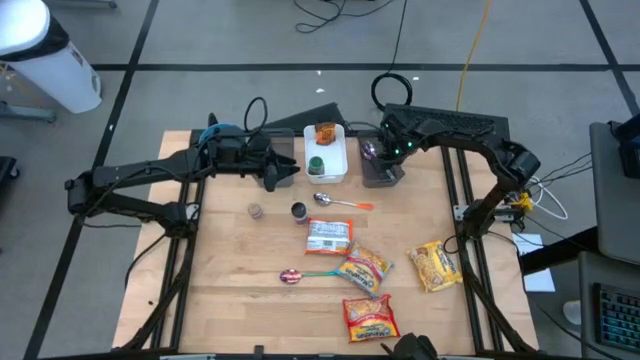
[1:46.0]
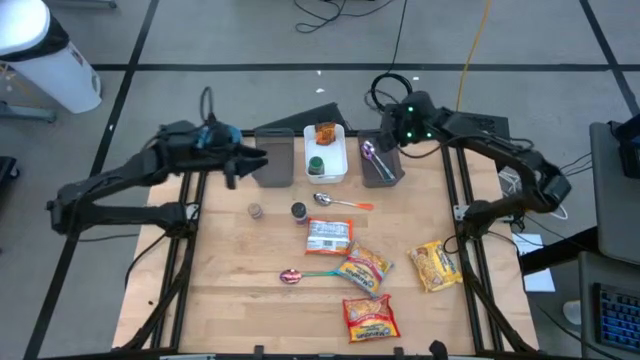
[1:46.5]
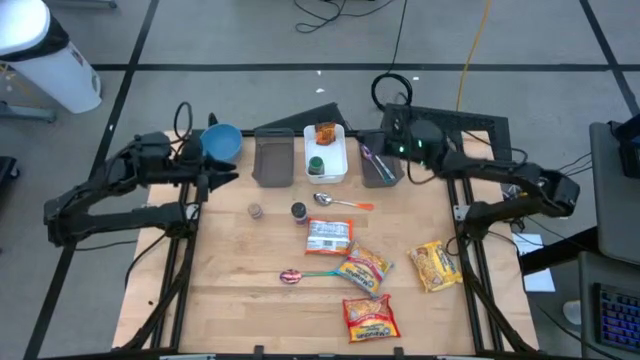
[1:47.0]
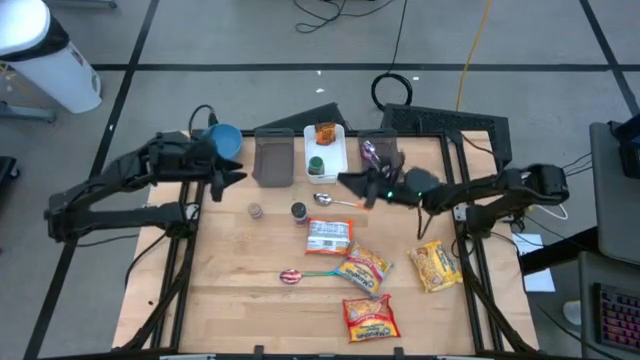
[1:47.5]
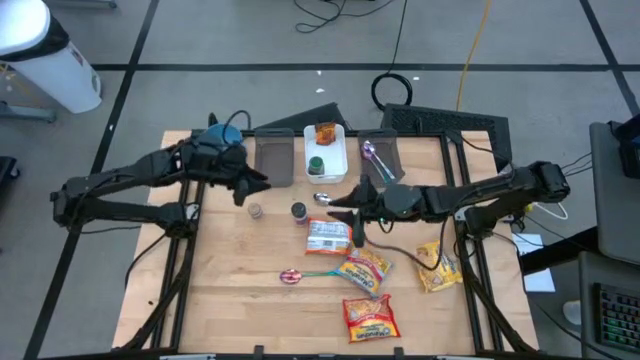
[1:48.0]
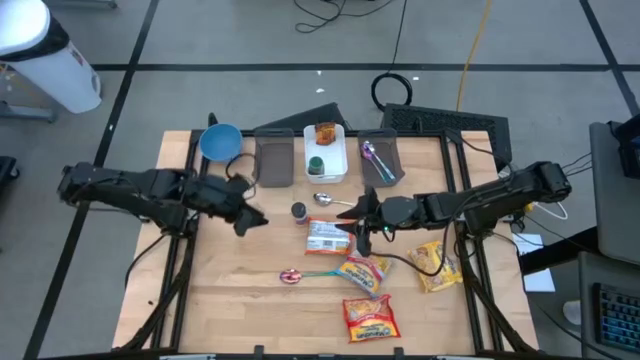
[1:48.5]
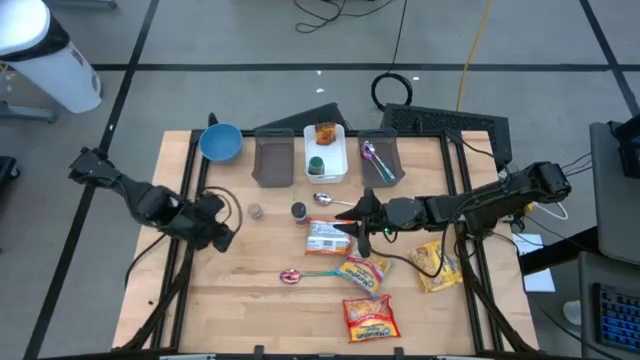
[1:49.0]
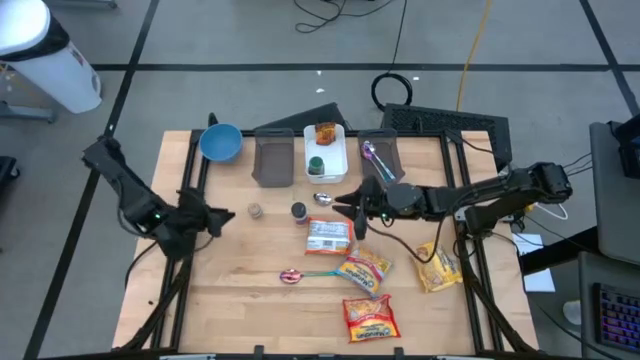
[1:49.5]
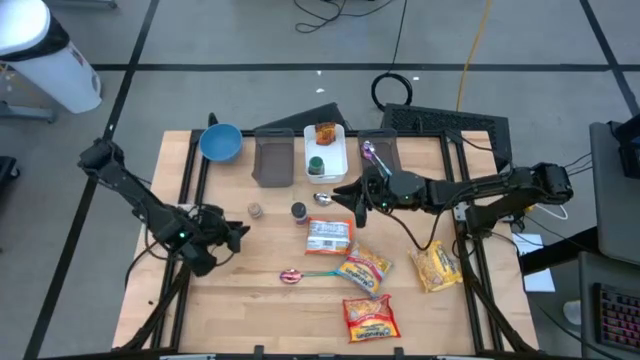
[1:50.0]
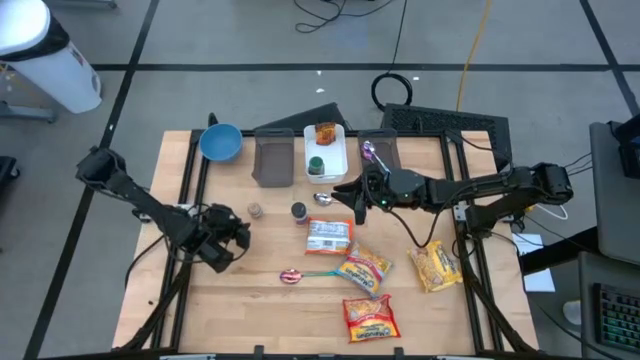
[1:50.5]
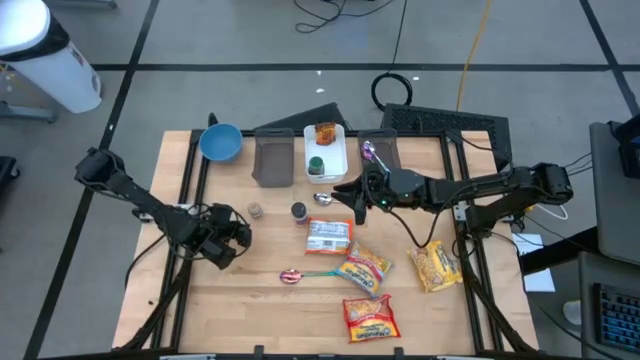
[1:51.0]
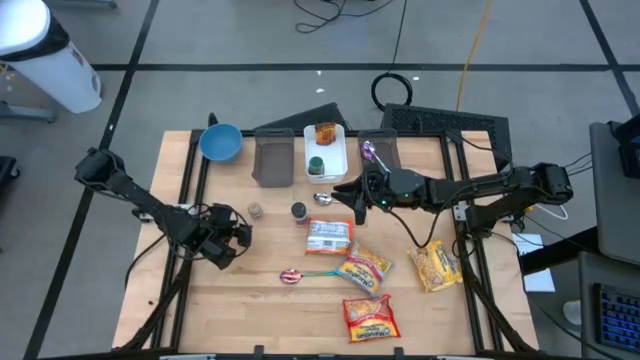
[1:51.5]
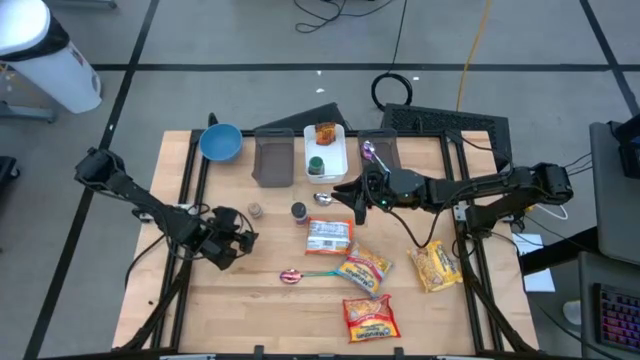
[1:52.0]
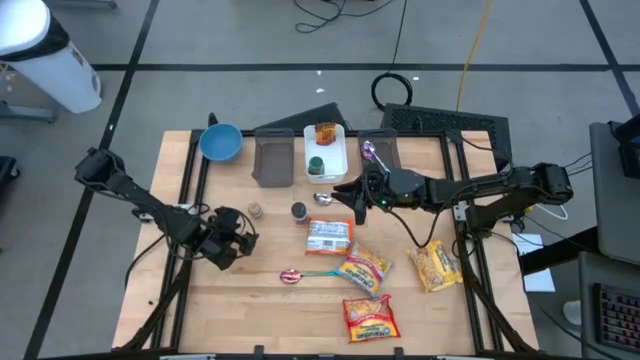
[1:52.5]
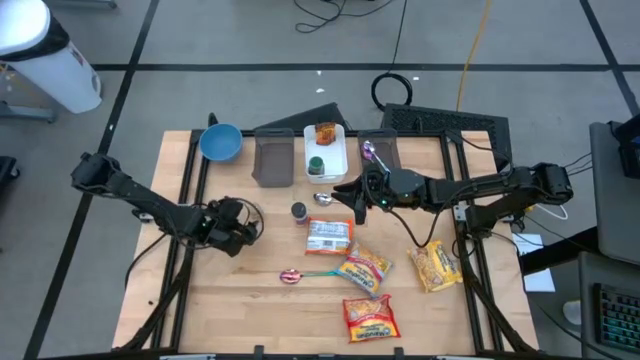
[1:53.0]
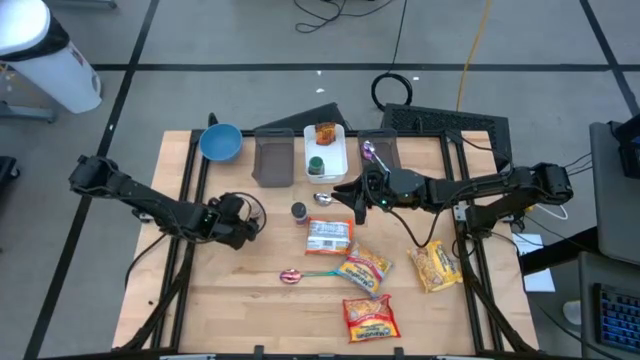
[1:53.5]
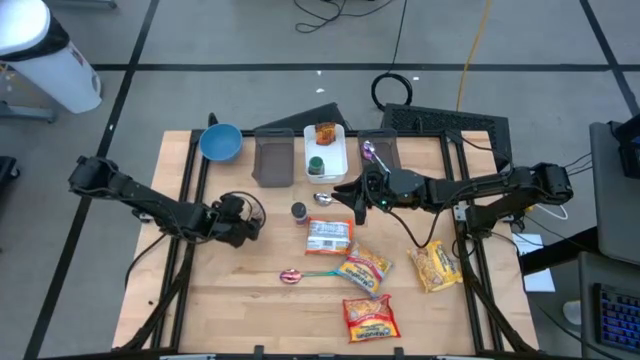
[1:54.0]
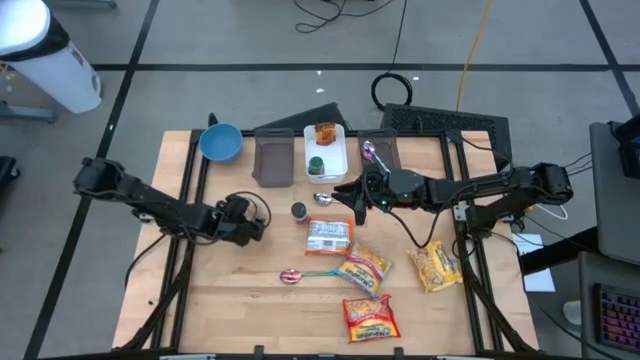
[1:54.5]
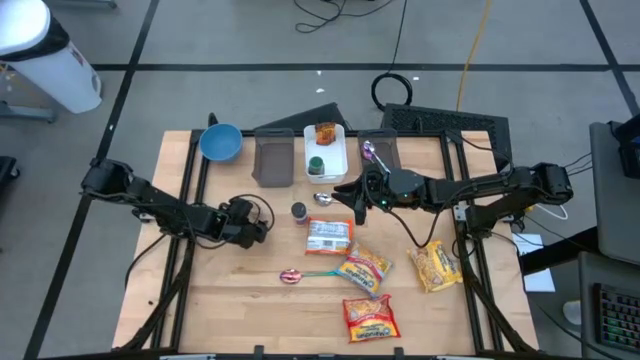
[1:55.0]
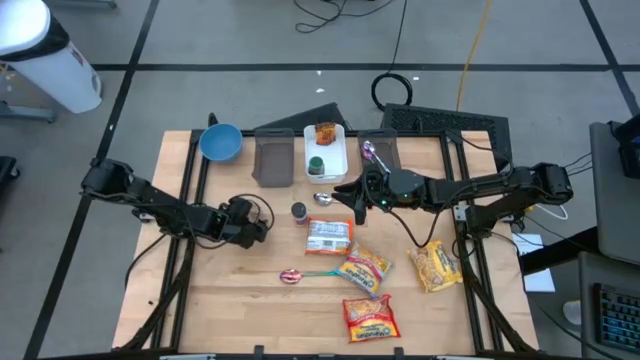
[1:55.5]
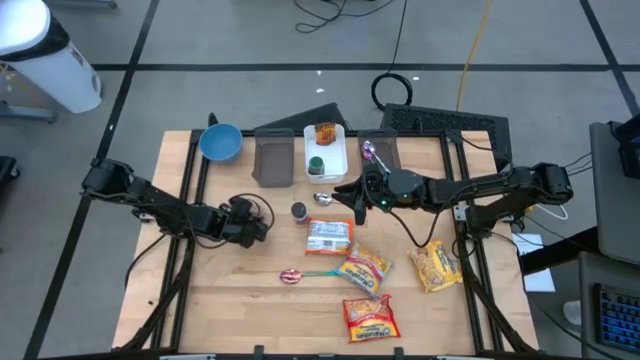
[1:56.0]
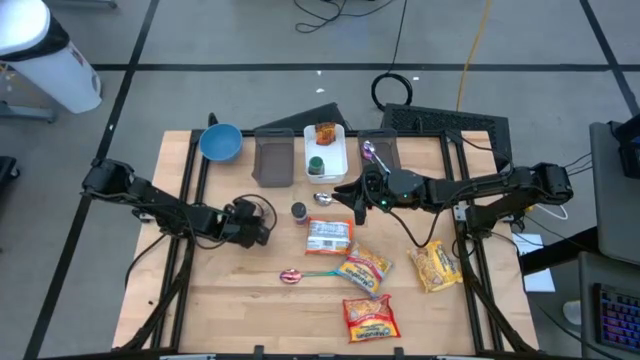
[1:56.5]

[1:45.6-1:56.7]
Task: Pick & Place Food Item
Put the brown seasoning bottle into the white bin

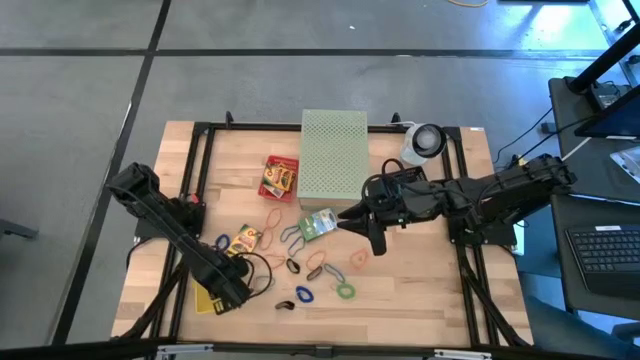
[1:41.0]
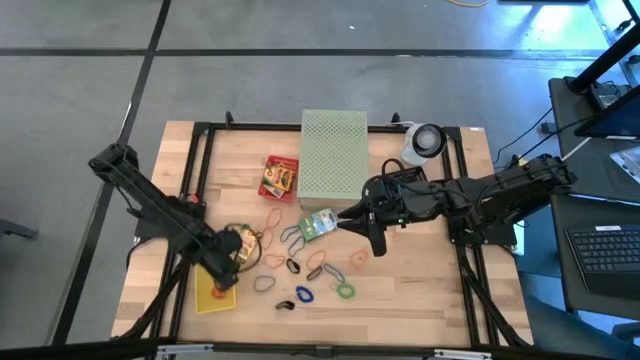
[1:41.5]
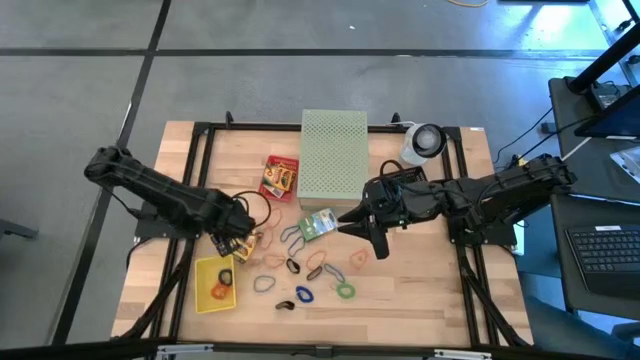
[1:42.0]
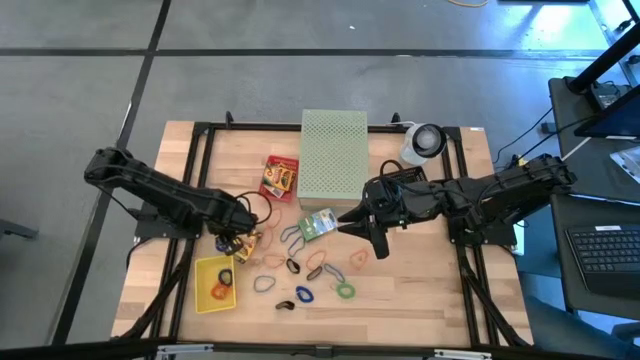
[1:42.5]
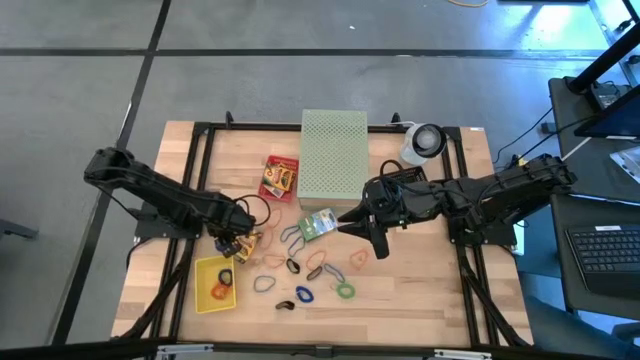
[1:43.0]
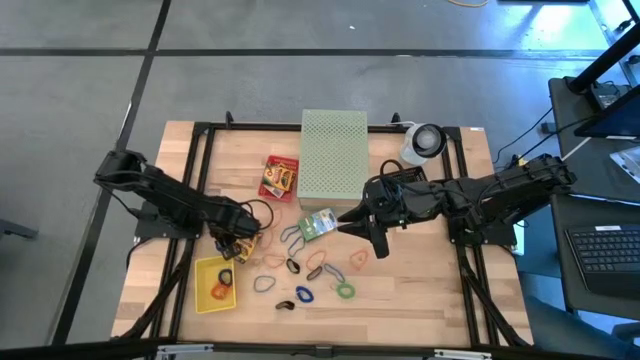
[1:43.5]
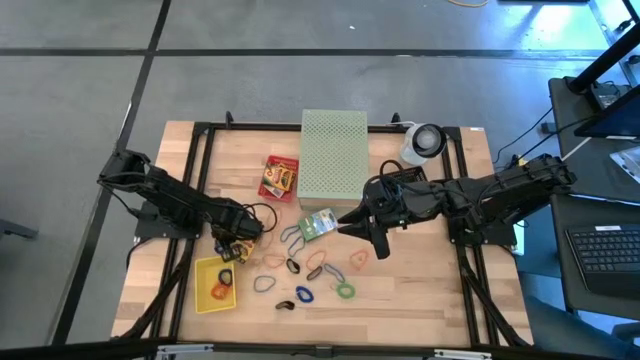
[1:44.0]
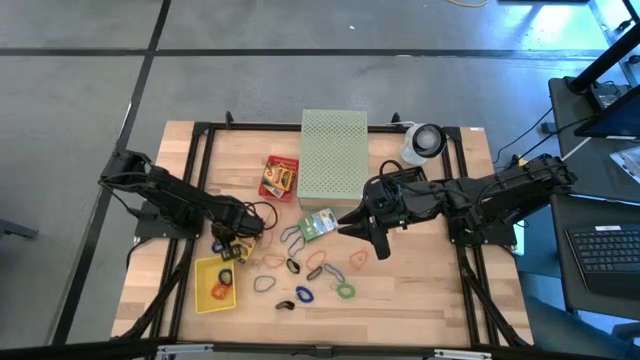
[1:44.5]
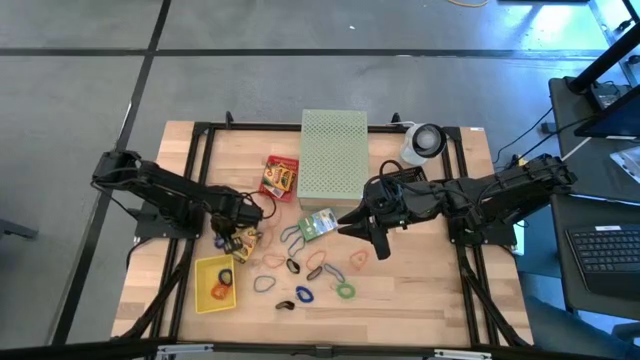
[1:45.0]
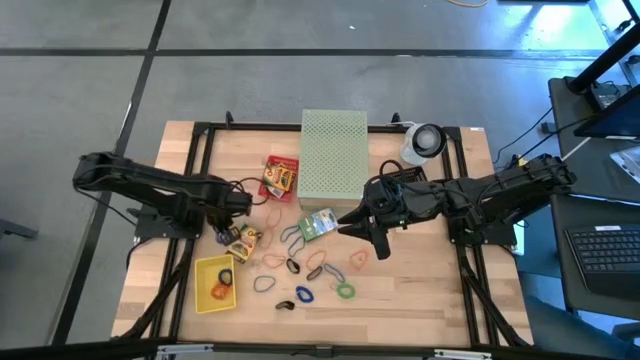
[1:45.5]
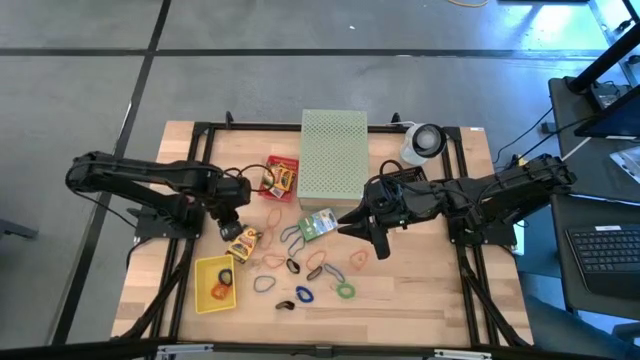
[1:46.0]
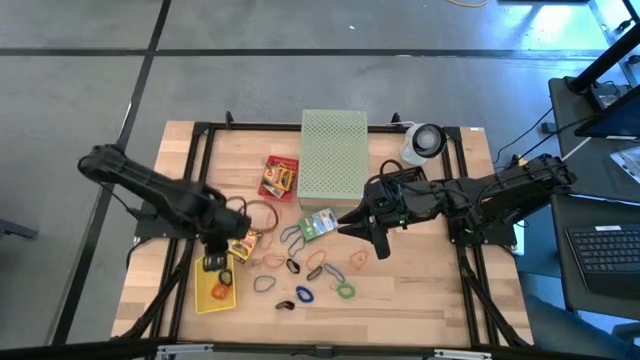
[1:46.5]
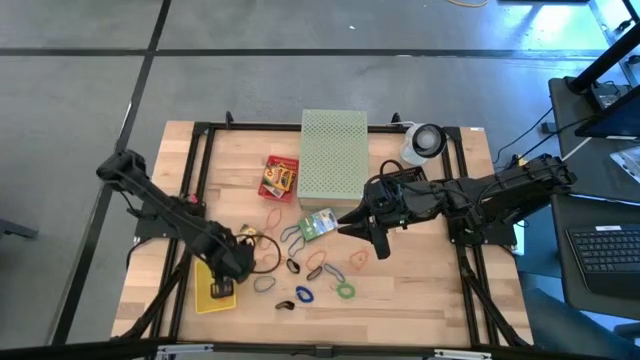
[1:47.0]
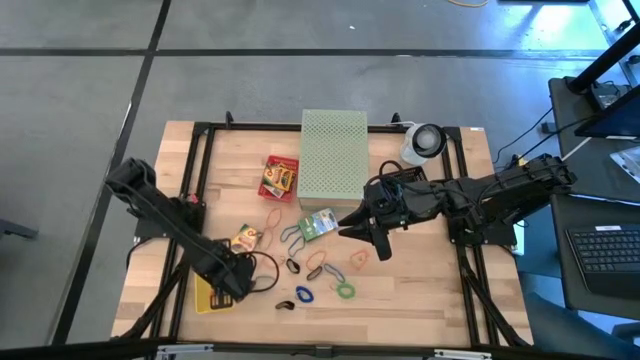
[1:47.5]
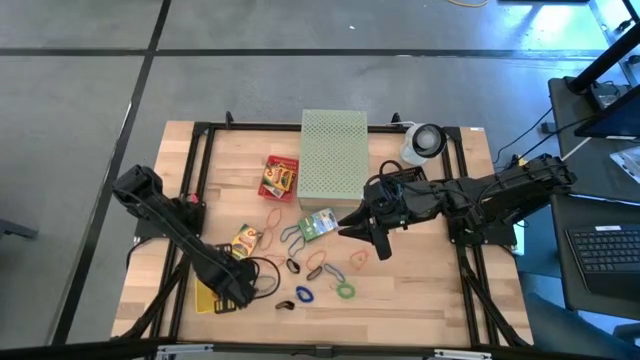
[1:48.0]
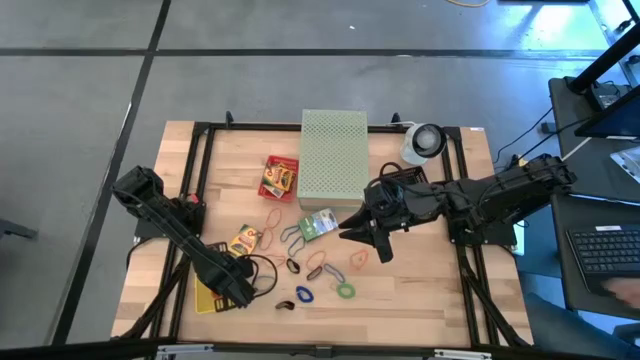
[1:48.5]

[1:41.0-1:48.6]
Task: Pick & Place Office Desk Supplies
Put the blue spring rubber band into the yellow bin

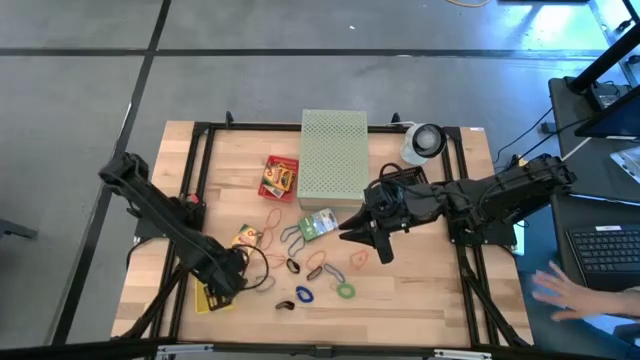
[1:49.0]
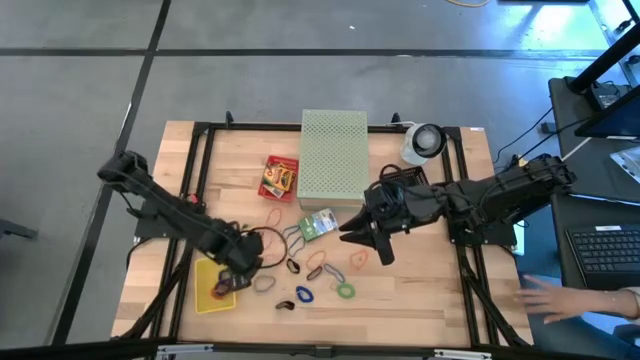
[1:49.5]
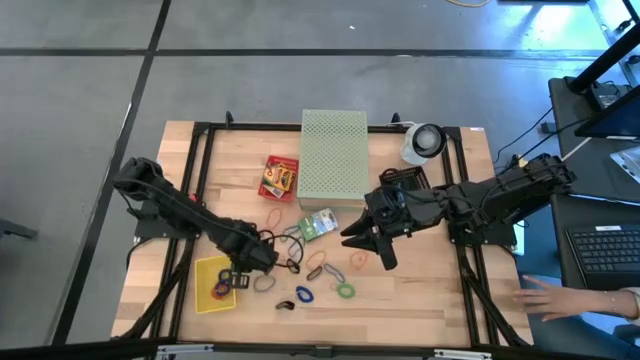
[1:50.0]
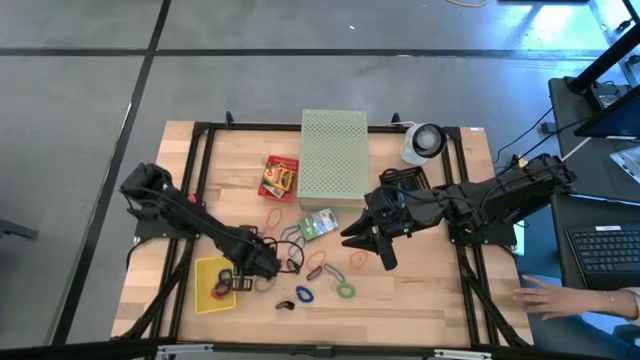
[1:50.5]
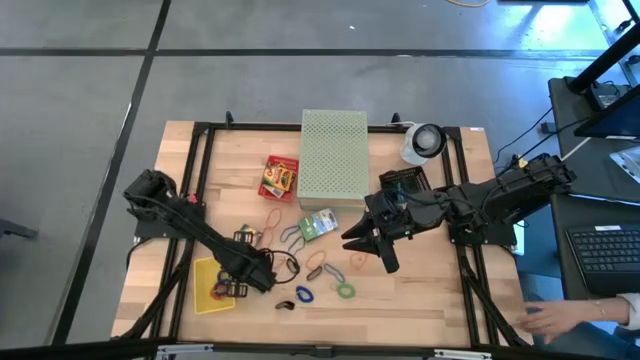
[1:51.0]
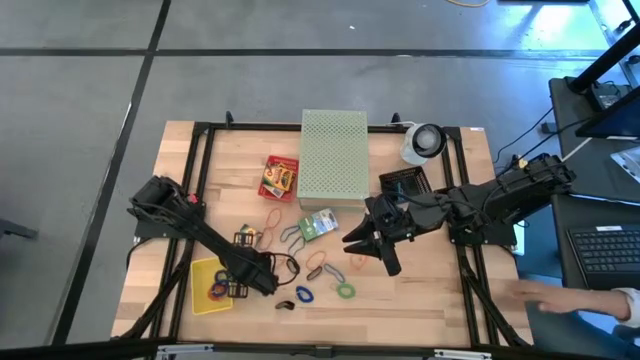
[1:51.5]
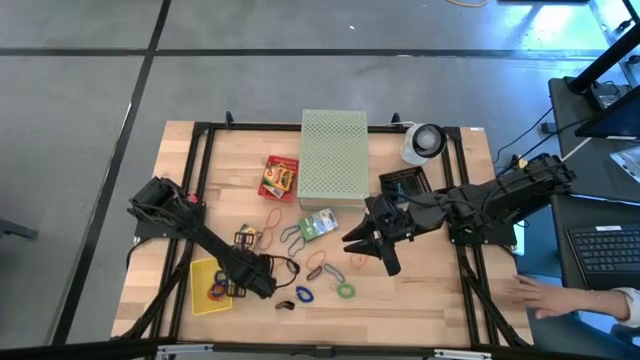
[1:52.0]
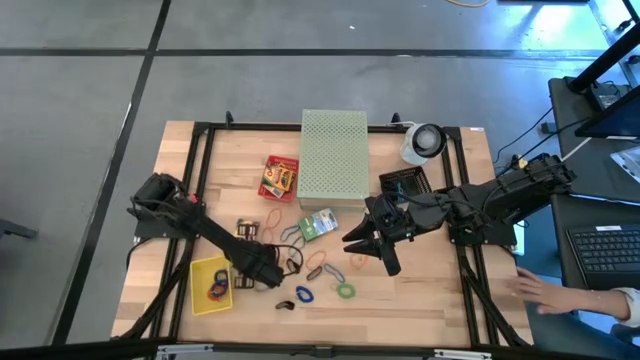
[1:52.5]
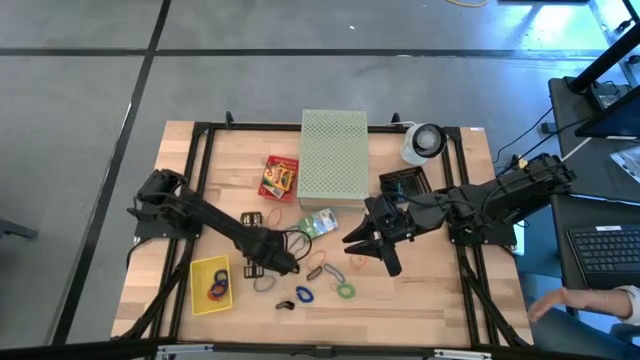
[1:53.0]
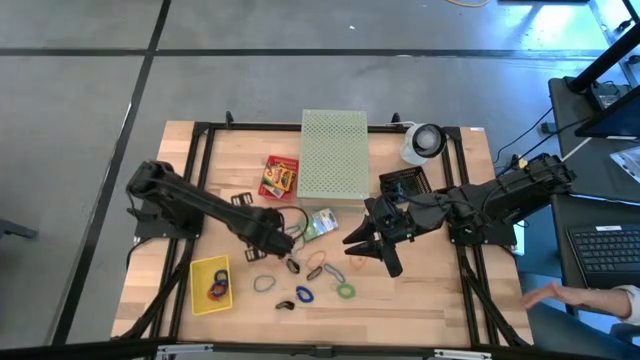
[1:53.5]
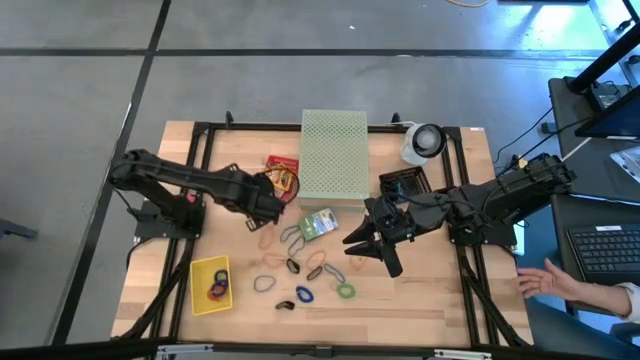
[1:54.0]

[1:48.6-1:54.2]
Put the crayola box into the orange bin
